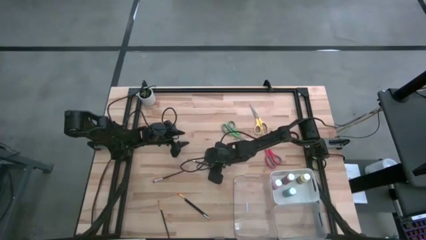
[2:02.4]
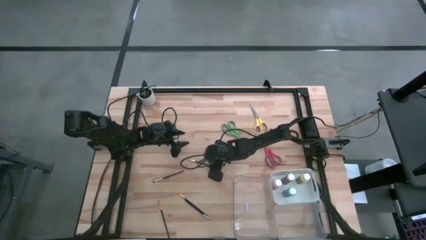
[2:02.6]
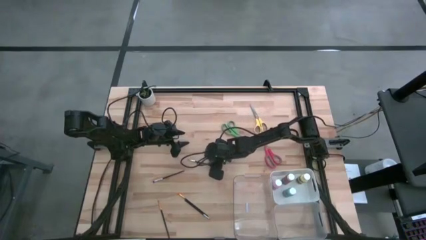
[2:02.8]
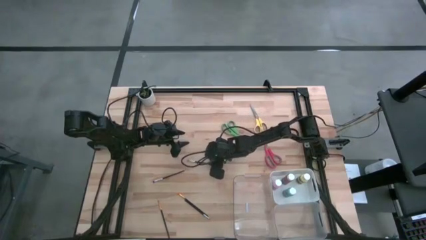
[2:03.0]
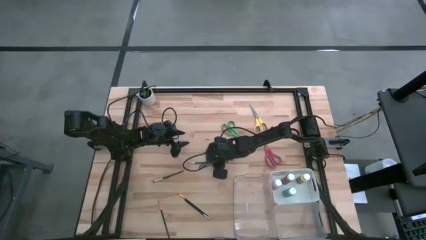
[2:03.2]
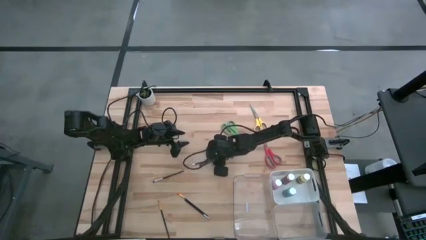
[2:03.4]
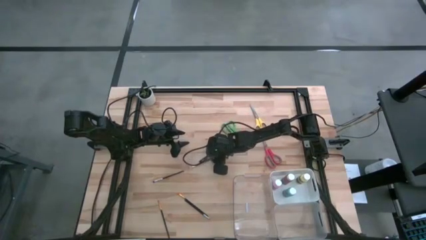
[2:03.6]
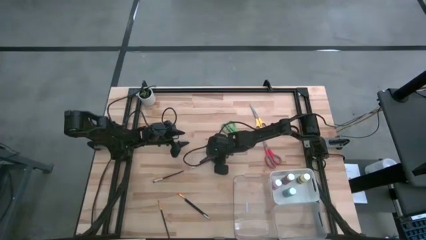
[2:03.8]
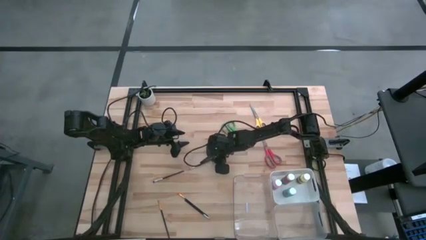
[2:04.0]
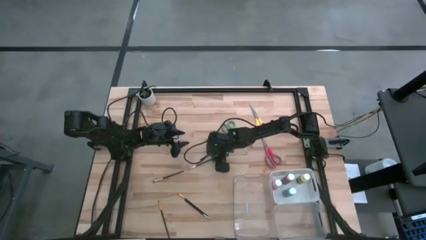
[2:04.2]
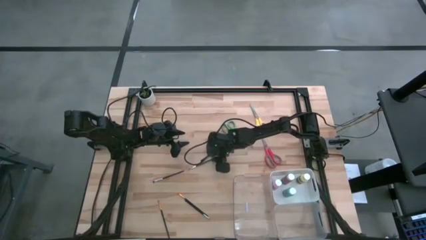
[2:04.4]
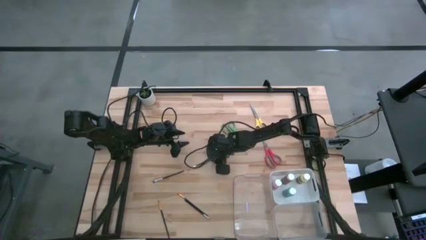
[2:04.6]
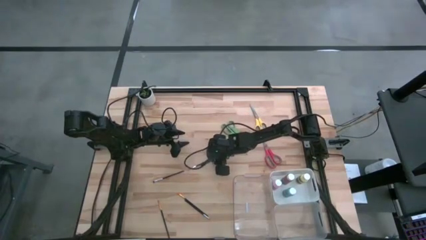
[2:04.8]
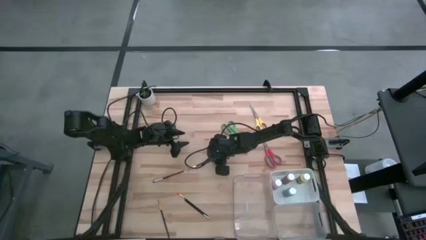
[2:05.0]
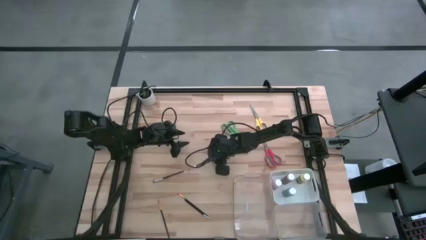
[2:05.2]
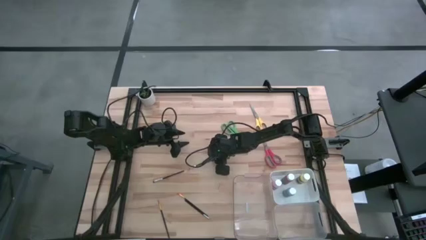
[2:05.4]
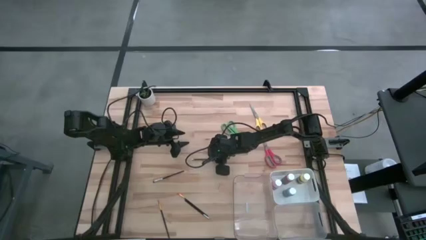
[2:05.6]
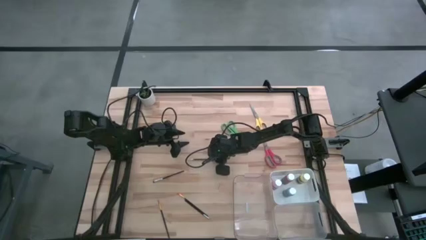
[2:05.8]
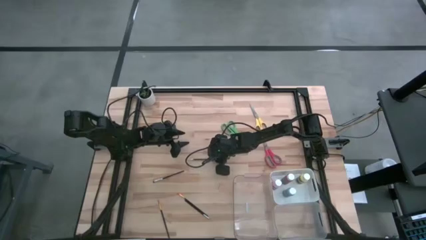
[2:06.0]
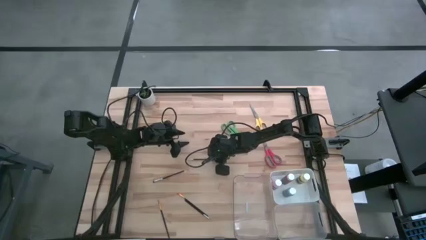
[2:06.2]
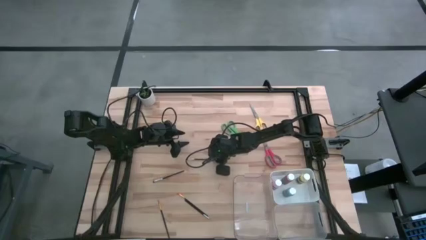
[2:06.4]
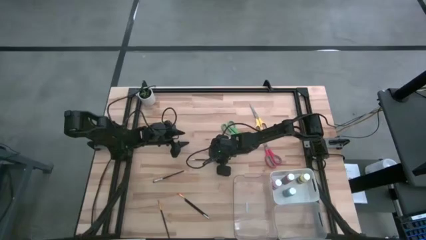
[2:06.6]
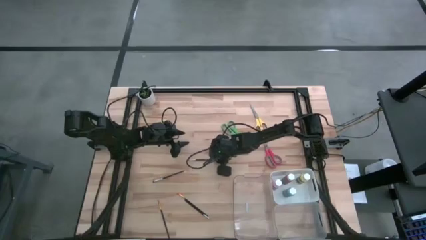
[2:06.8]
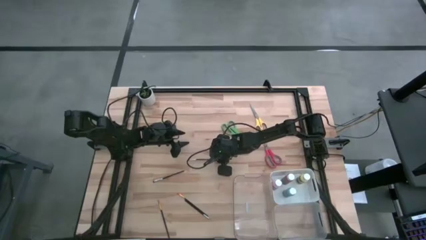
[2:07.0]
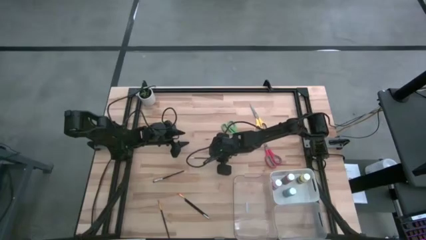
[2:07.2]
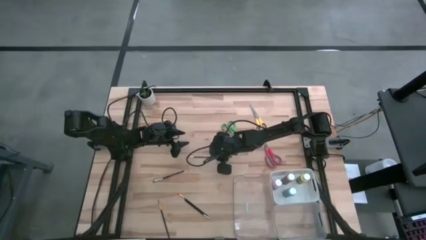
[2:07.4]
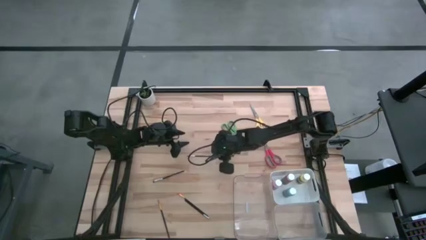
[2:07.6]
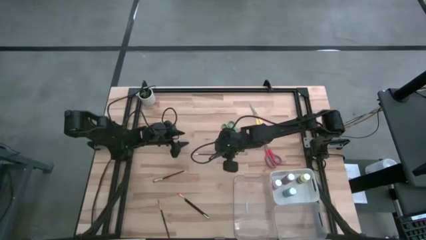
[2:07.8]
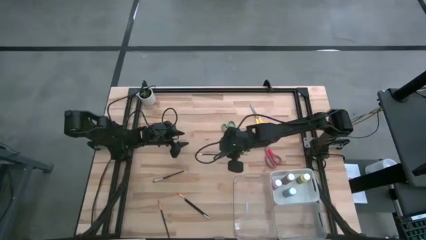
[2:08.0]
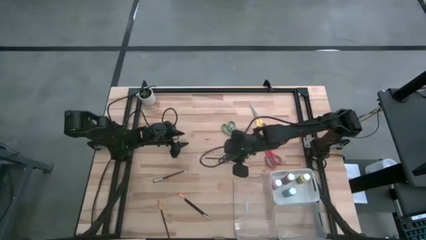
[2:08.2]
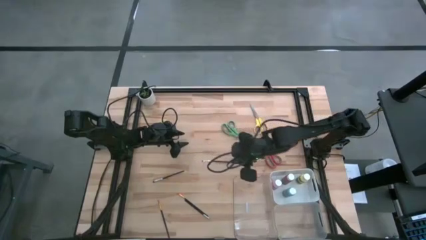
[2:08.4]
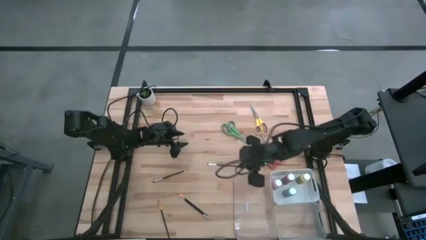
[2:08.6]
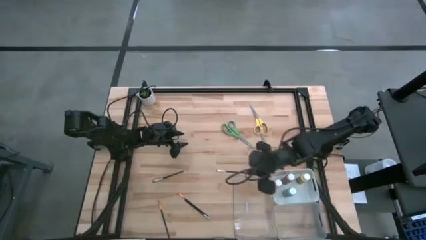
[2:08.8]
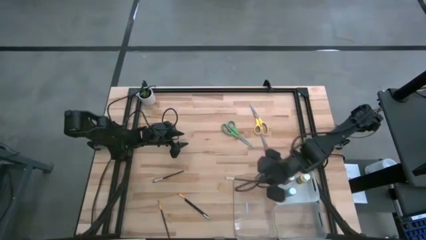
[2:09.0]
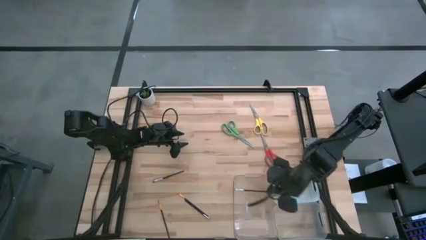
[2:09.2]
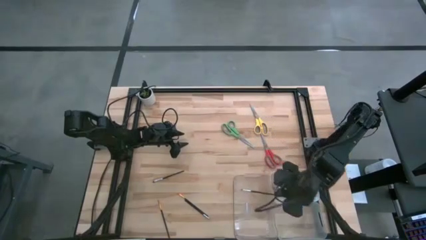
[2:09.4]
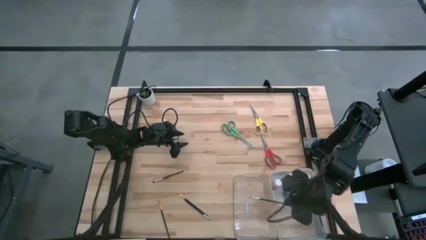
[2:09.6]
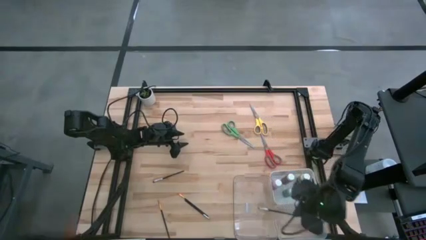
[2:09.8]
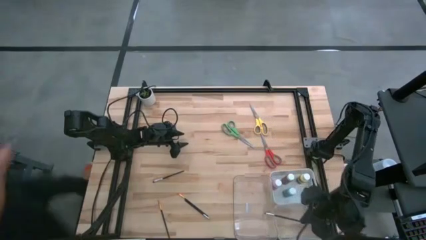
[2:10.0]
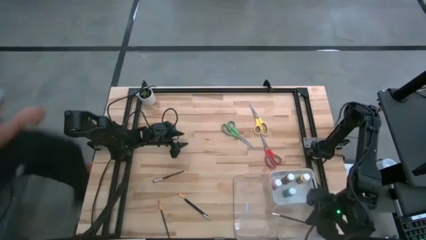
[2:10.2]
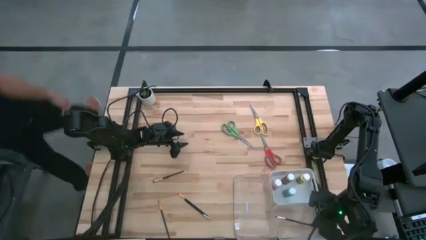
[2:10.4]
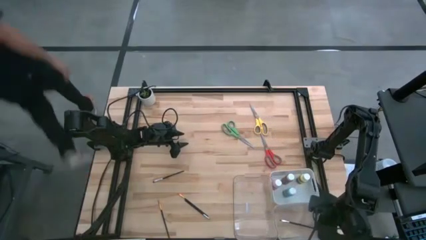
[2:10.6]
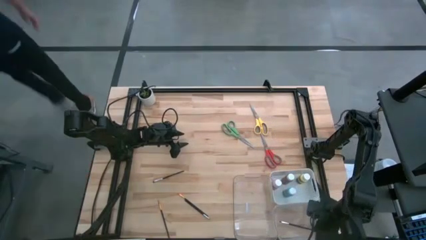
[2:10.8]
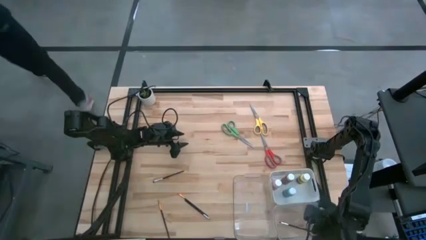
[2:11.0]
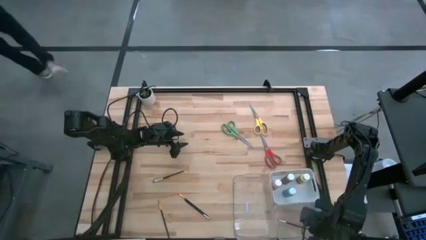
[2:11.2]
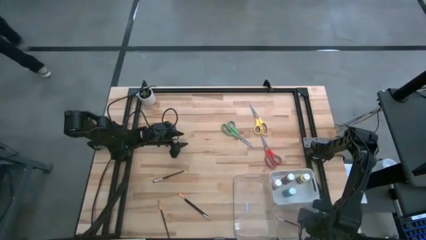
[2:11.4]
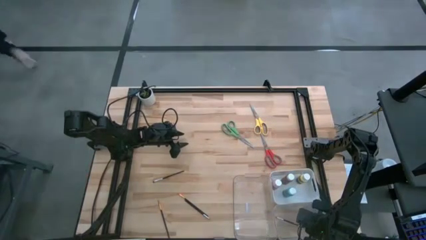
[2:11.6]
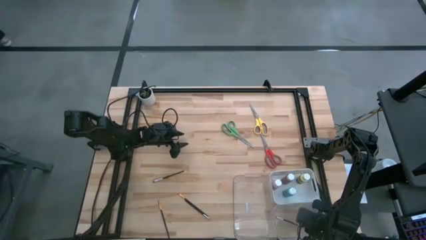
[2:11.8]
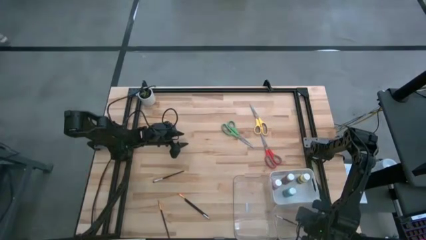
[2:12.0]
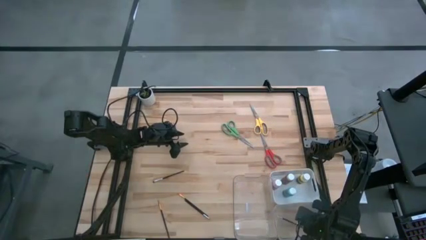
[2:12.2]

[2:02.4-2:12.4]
Task: Pick & Place Paint Supplies
Put the top silver paintbrush into the right transparent bin

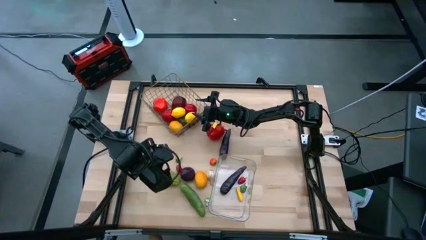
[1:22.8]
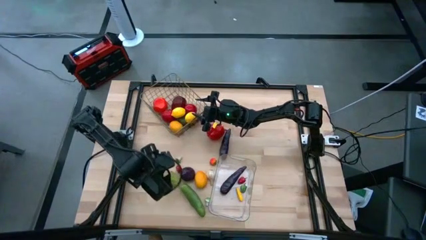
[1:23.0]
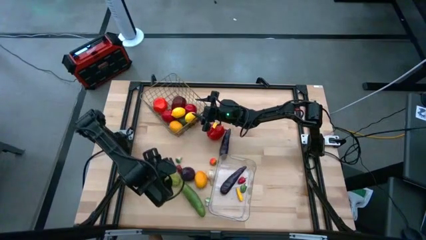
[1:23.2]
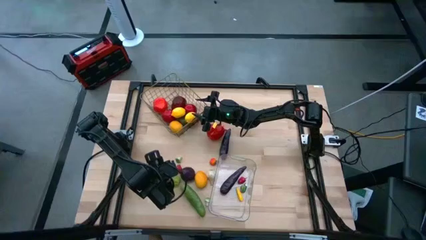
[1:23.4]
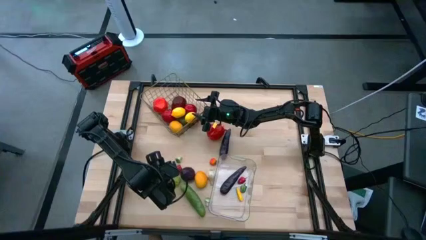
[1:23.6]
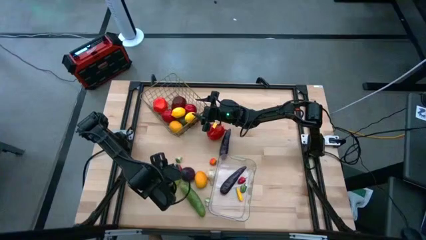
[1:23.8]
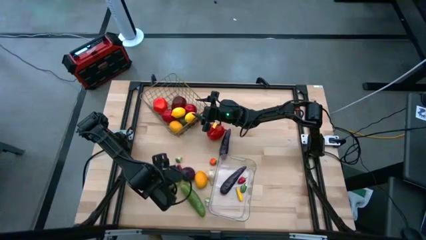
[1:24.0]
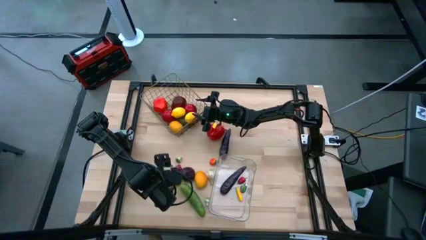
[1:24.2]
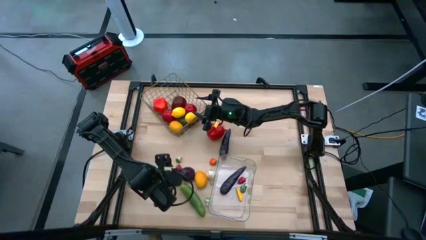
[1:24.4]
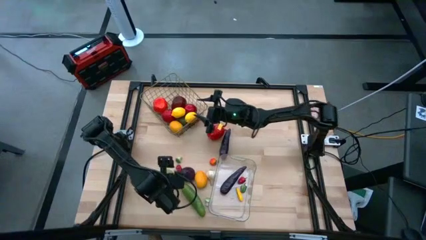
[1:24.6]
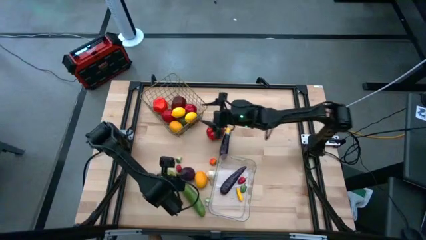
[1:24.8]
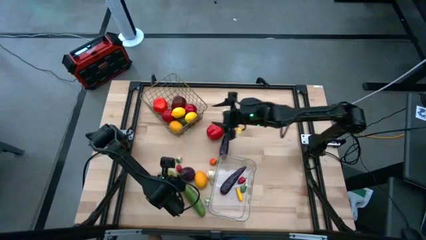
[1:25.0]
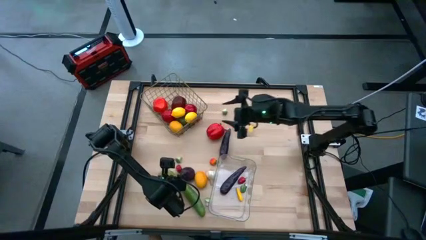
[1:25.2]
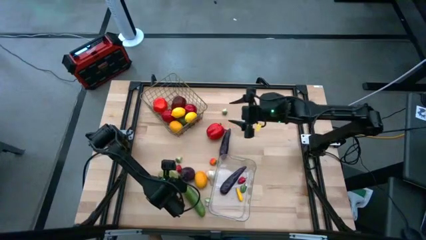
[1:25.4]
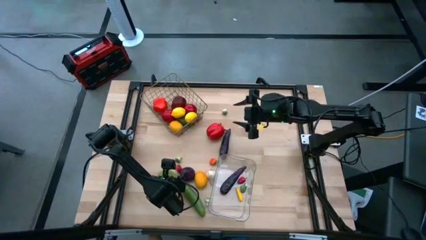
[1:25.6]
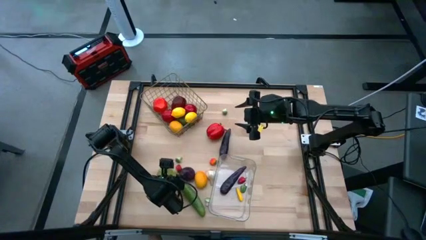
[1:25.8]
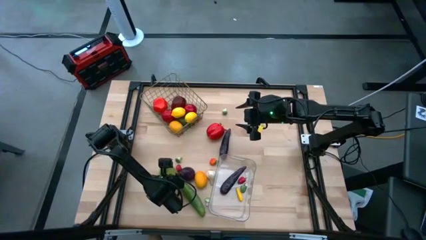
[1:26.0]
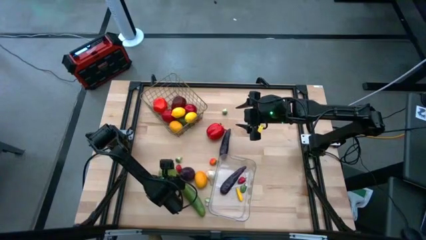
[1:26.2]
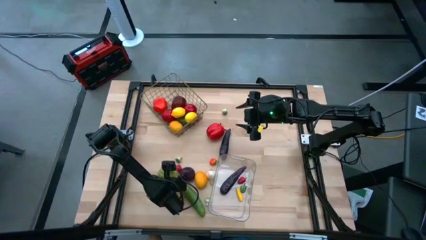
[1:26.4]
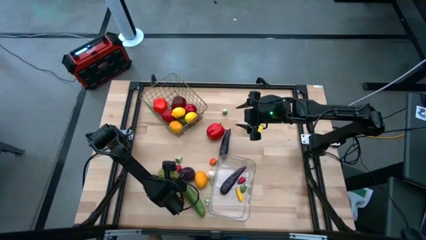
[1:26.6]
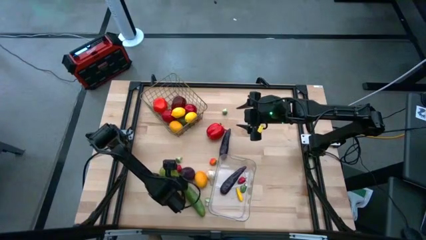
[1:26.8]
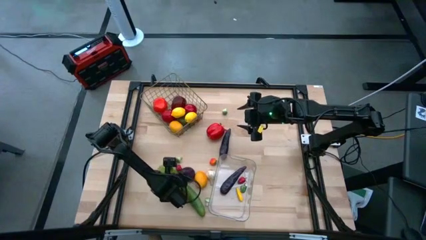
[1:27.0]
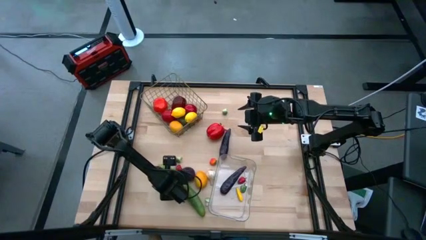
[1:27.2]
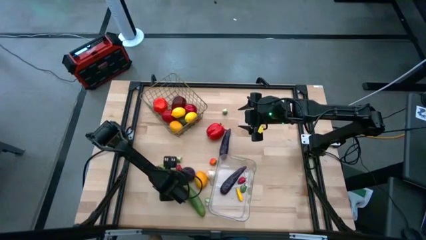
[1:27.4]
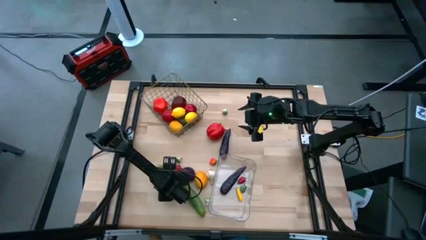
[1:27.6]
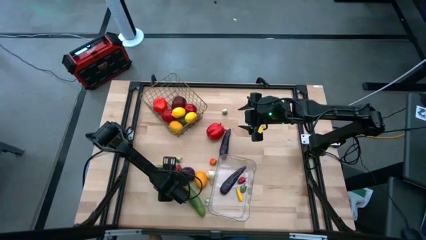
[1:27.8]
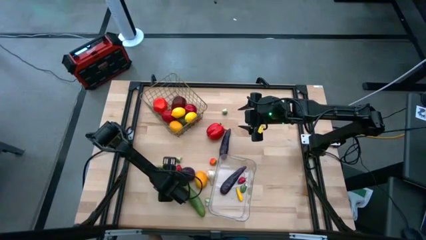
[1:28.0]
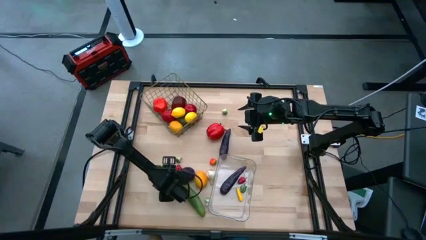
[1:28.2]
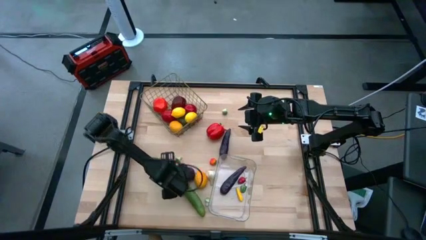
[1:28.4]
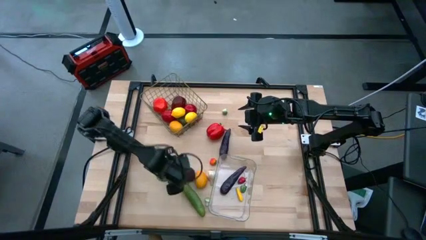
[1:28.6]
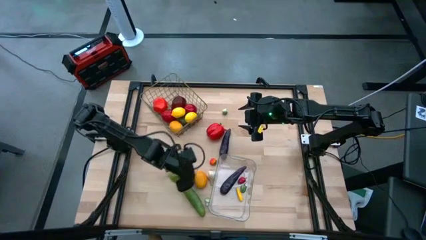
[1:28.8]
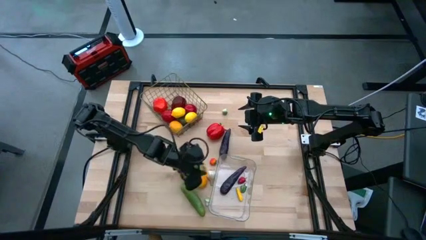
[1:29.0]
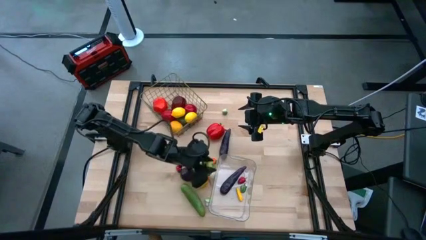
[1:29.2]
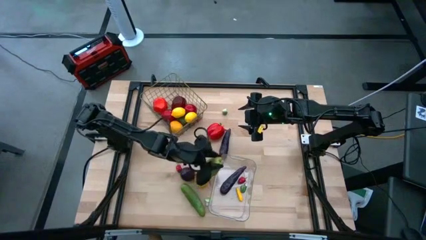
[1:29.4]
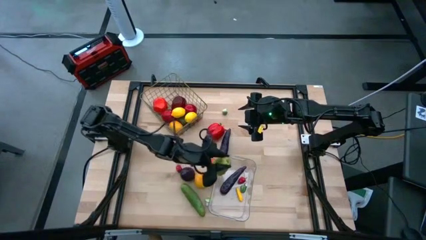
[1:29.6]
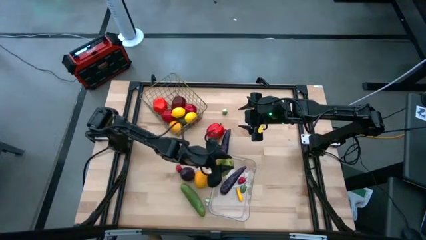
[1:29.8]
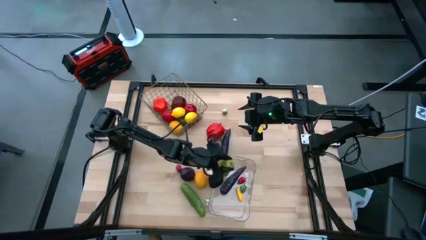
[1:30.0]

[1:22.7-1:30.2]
Task: Sort produce into baskets
Put the green chayote into the transparent bin
